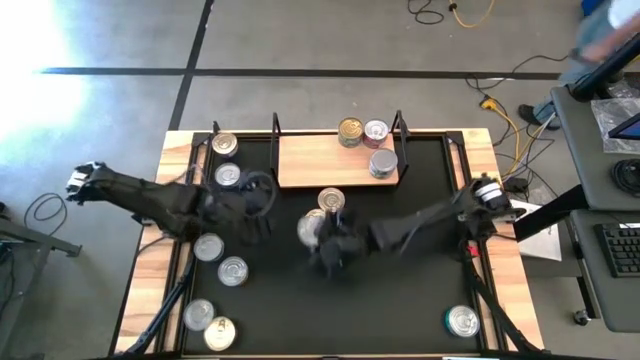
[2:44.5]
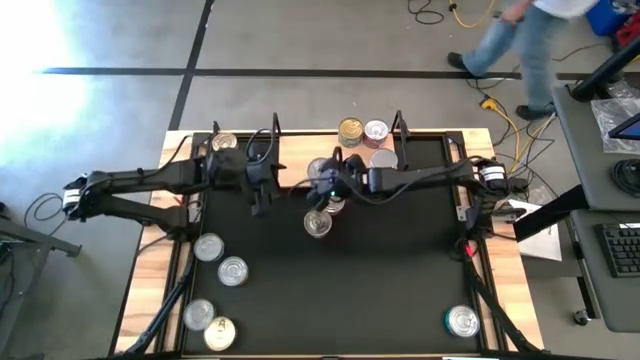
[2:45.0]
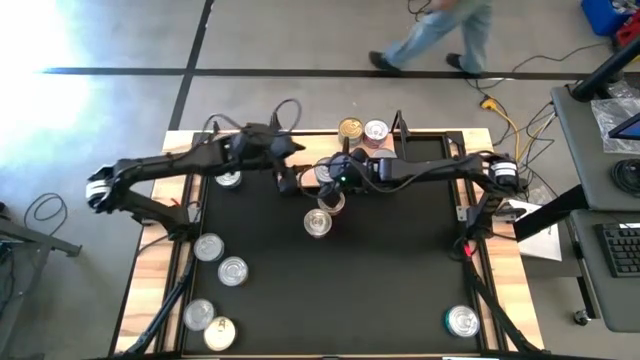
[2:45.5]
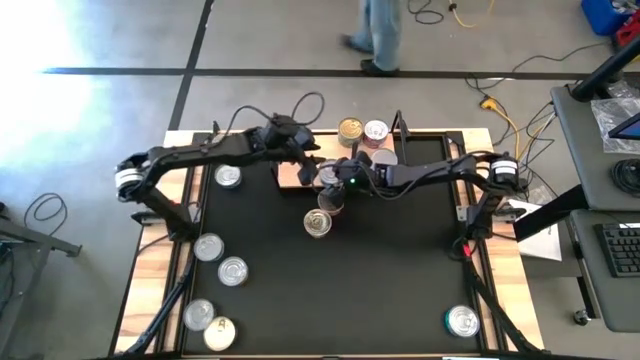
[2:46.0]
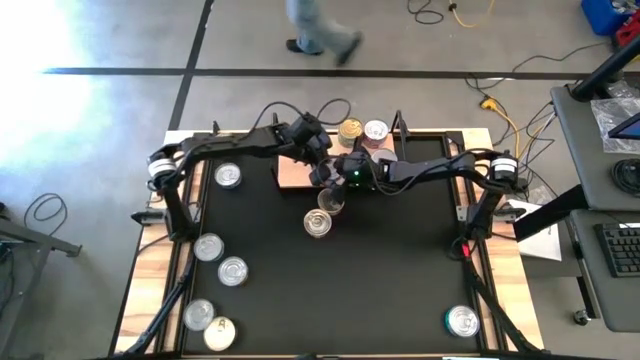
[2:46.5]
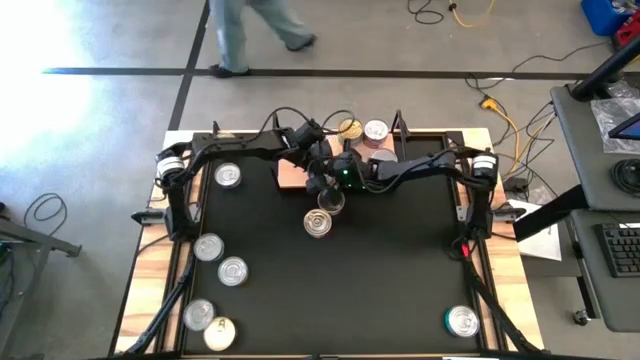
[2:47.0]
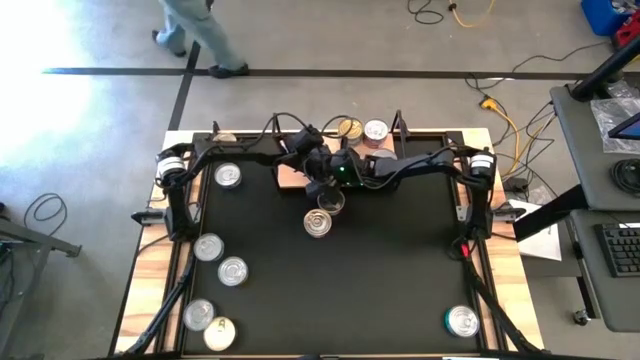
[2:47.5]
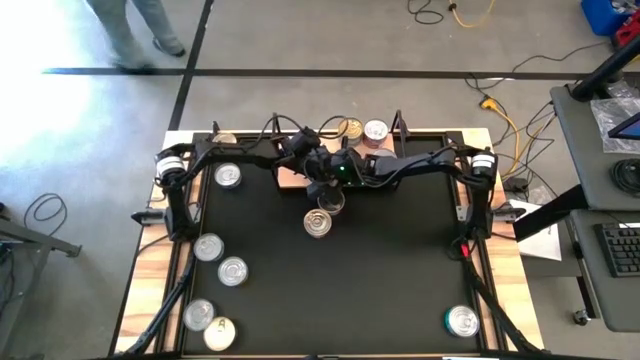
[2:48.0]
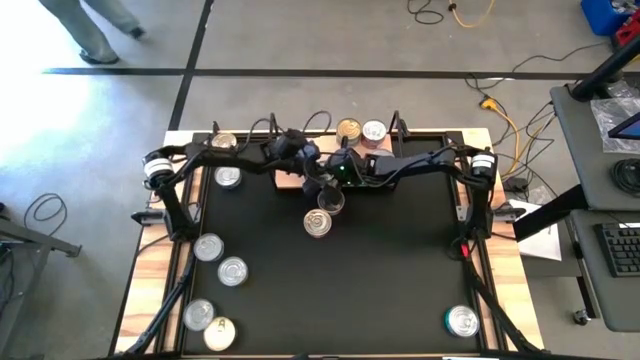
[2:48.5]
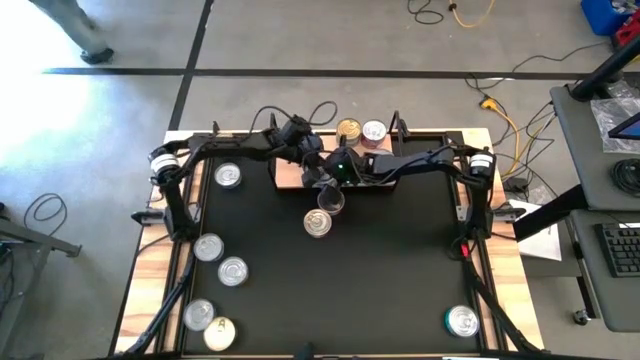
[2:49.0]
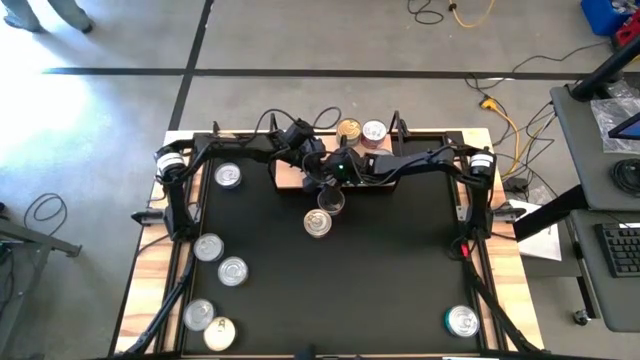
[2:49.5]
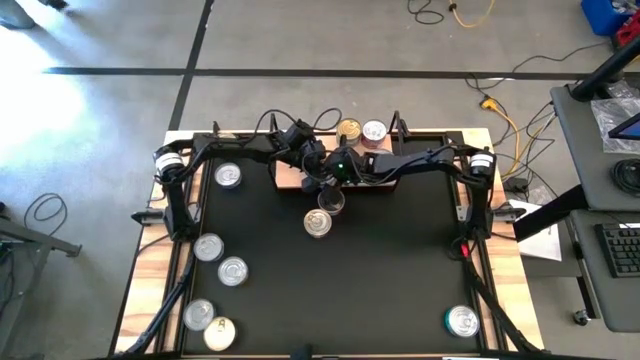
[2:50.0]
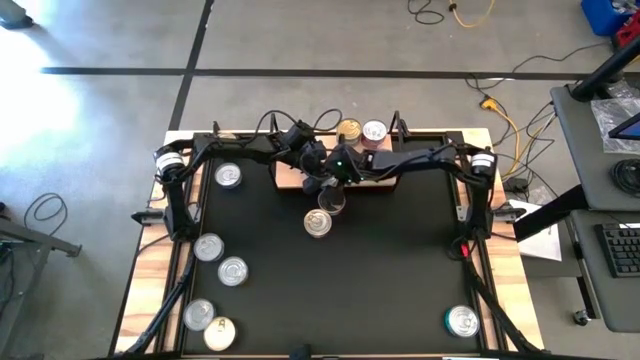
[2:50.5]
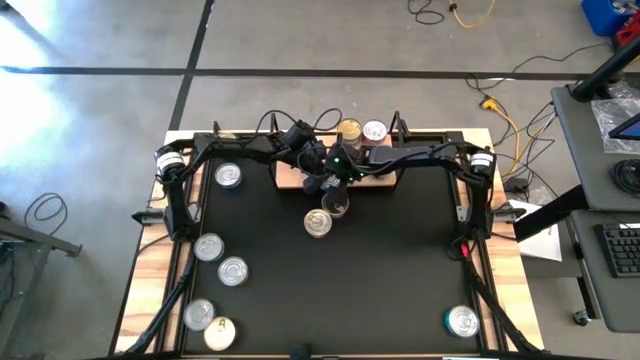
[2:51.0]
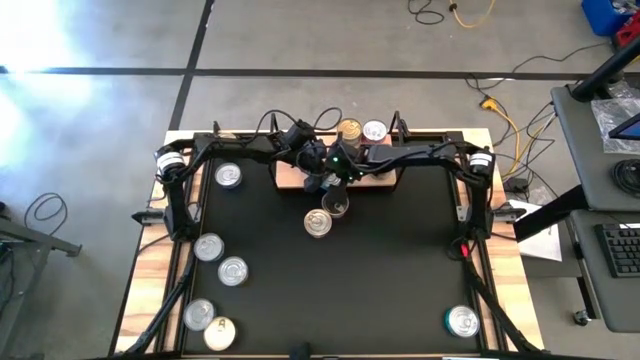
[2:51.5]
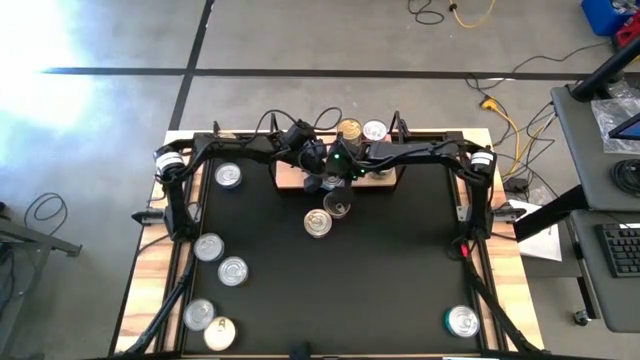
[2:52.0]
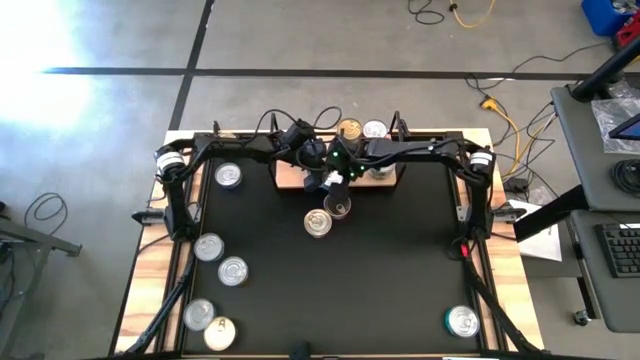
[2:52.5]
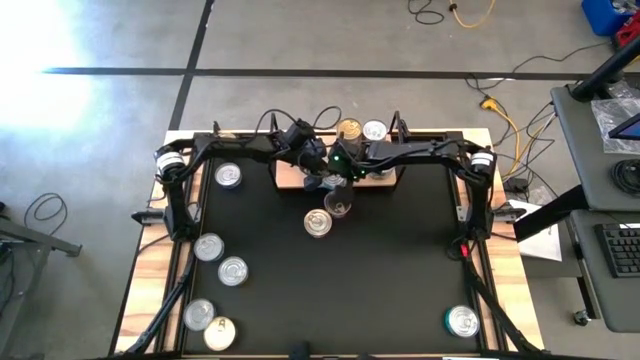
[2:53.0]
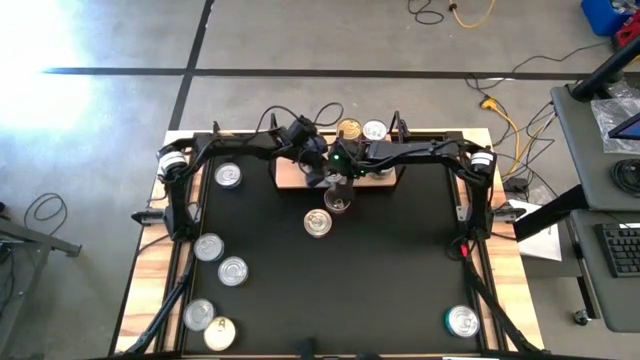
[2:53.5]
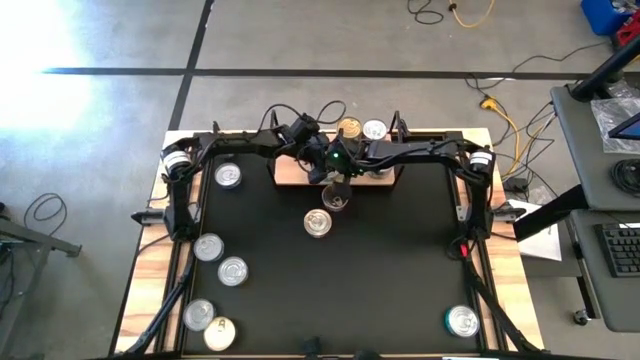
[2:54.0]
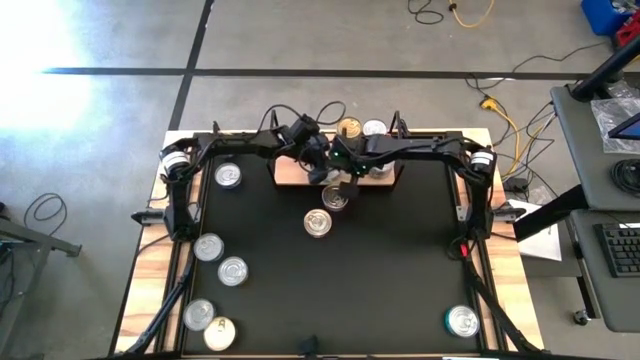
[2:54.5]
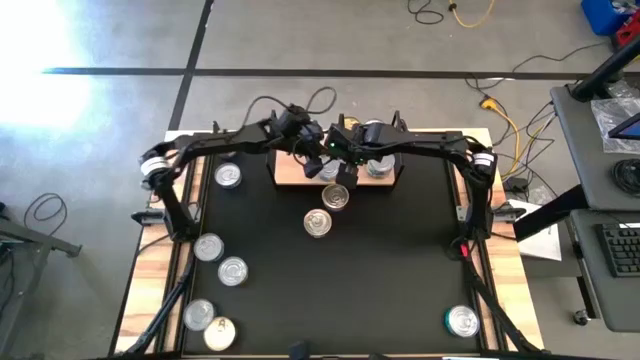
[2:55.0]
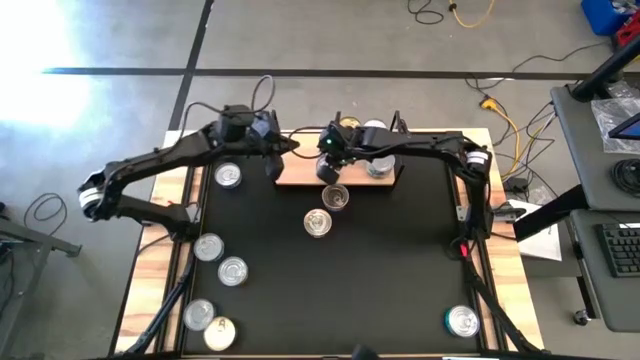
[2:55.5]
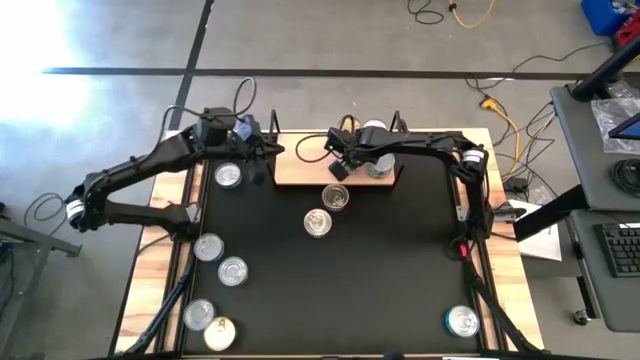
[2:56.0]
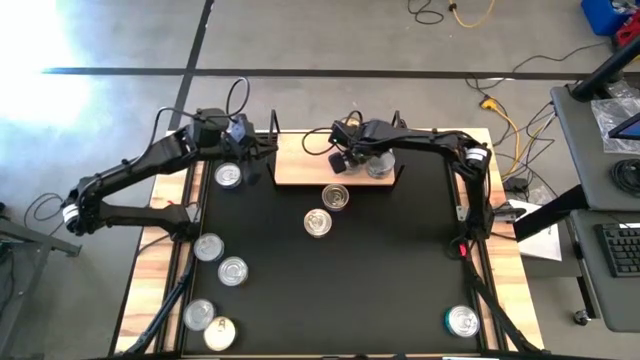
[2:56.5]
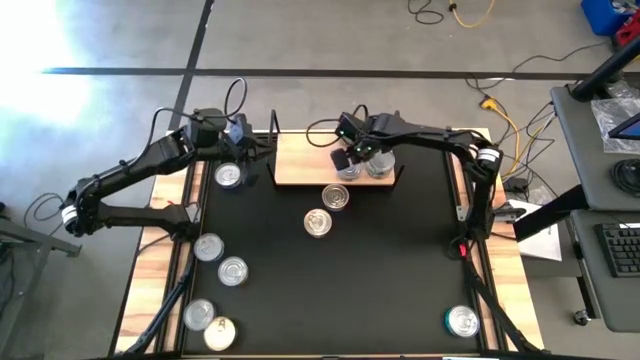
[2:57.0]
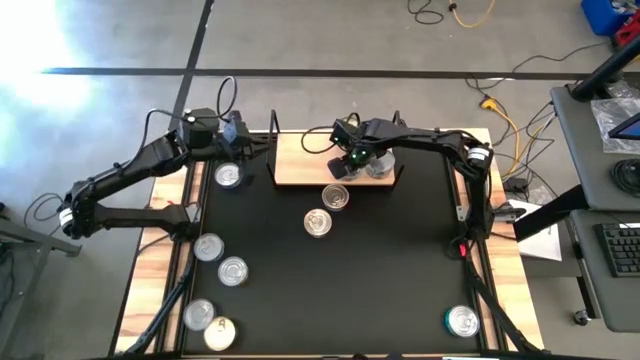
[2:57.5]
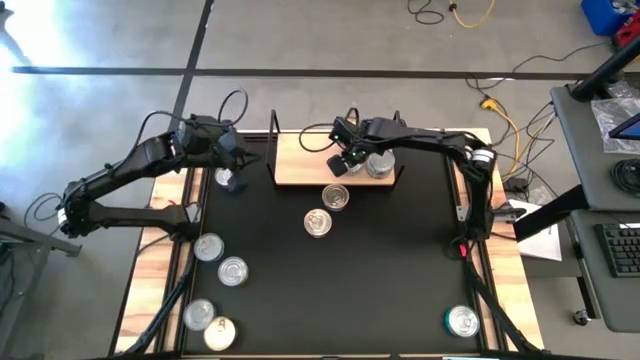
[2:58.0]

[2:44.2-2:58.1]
Task: Stack canned seafood by type on shelf
Put the yellow-blue tuna can on the shelf
